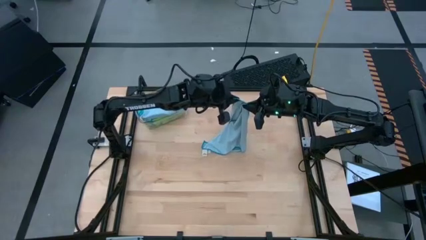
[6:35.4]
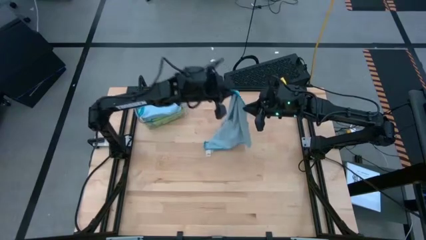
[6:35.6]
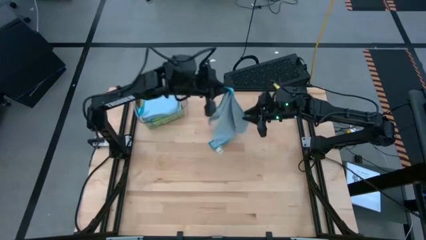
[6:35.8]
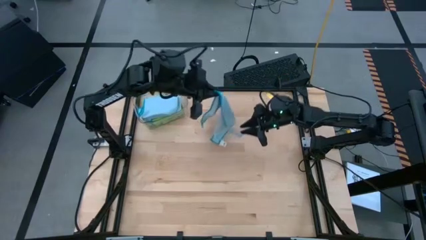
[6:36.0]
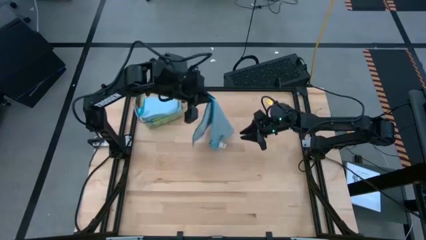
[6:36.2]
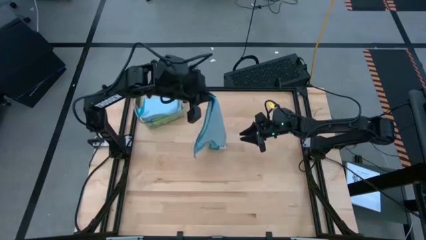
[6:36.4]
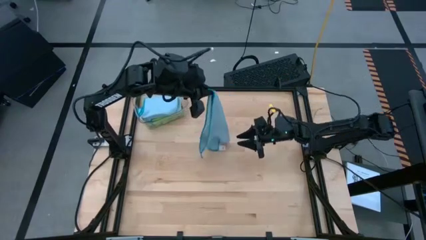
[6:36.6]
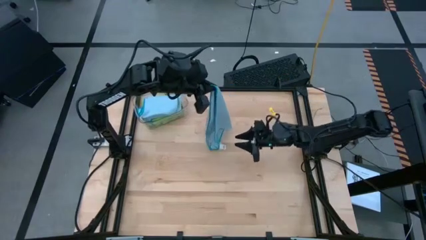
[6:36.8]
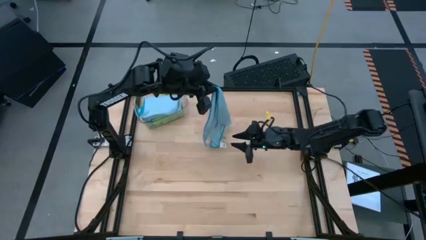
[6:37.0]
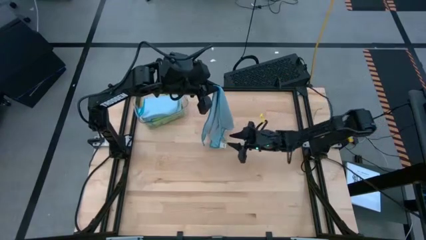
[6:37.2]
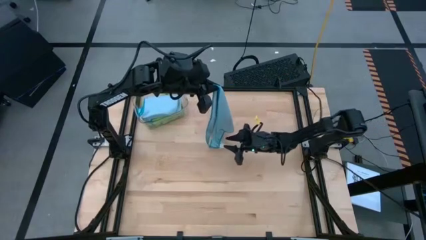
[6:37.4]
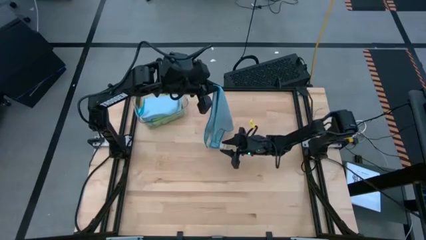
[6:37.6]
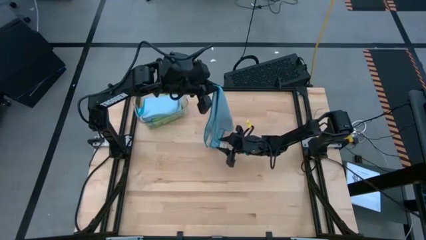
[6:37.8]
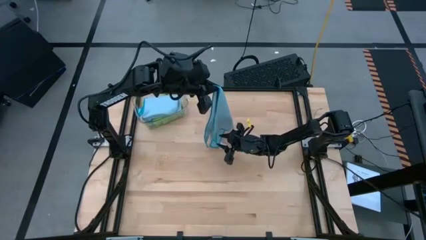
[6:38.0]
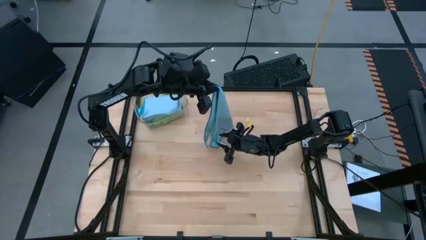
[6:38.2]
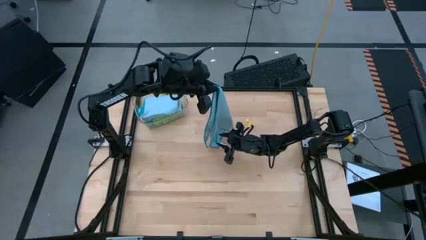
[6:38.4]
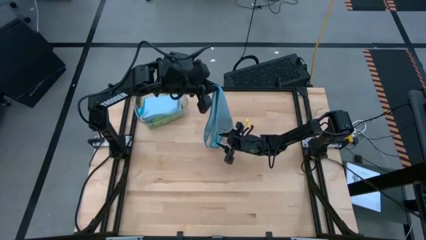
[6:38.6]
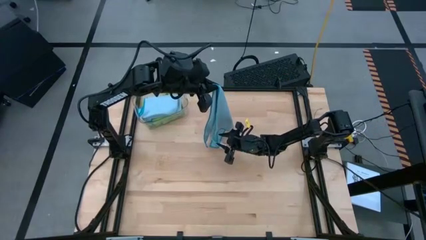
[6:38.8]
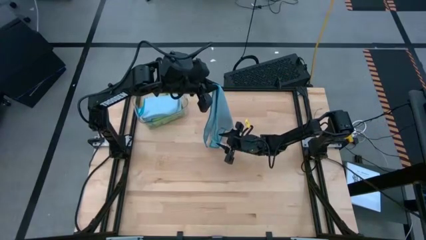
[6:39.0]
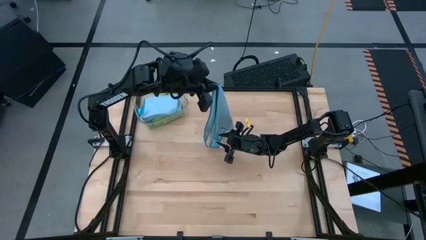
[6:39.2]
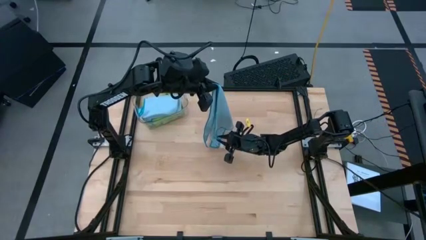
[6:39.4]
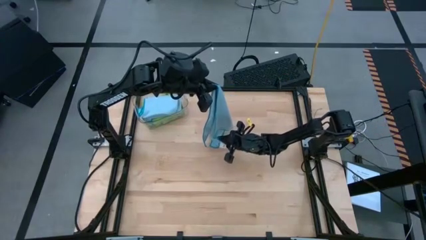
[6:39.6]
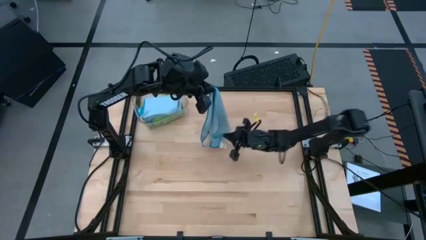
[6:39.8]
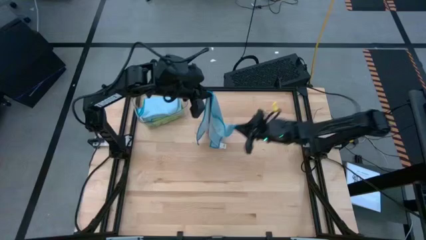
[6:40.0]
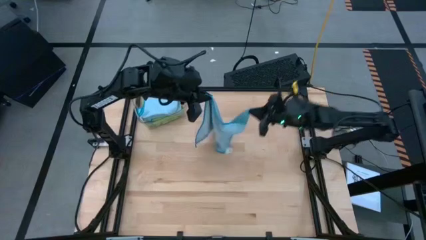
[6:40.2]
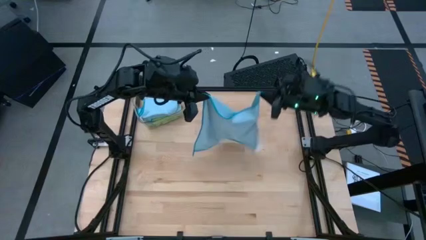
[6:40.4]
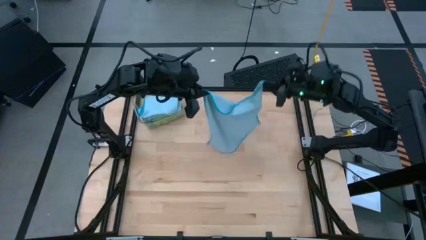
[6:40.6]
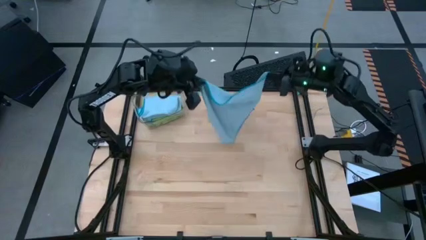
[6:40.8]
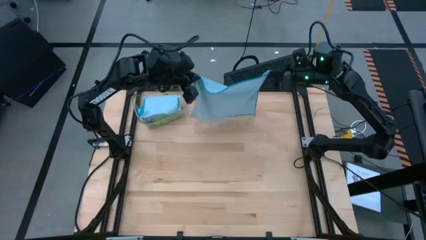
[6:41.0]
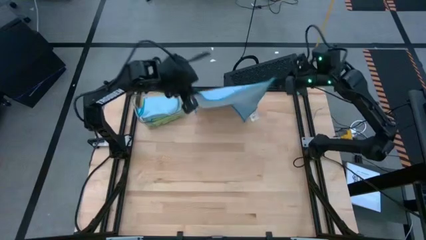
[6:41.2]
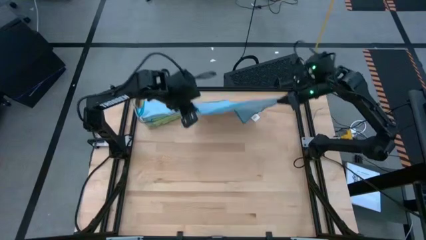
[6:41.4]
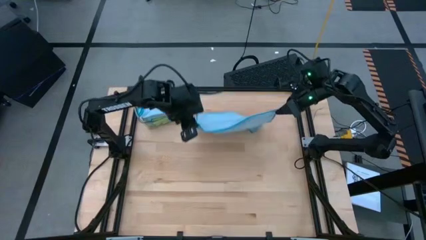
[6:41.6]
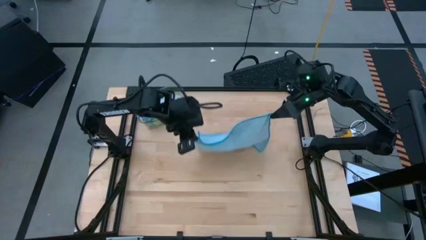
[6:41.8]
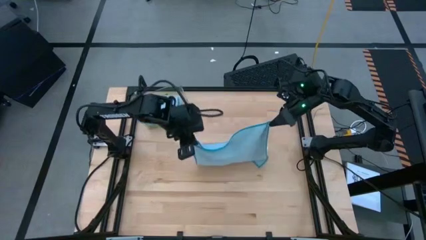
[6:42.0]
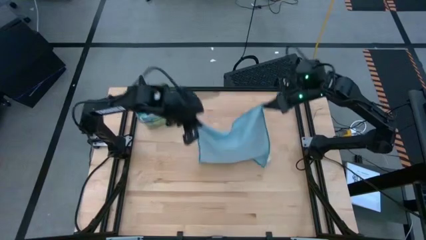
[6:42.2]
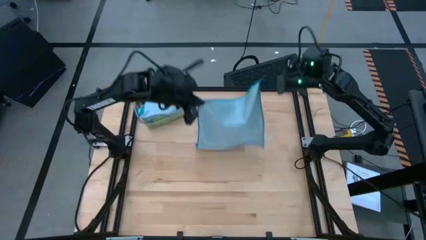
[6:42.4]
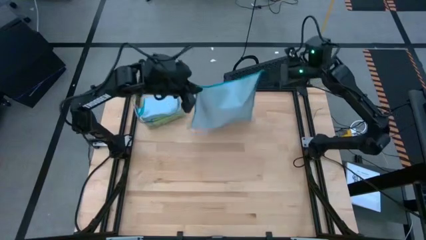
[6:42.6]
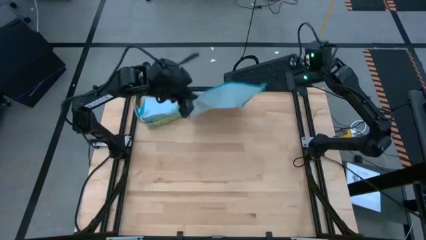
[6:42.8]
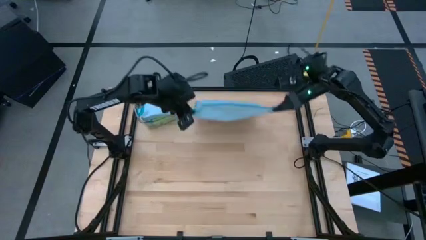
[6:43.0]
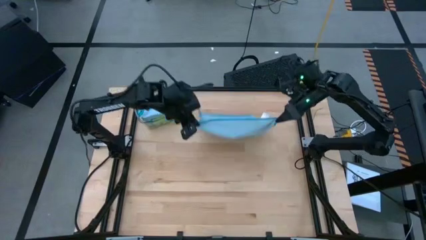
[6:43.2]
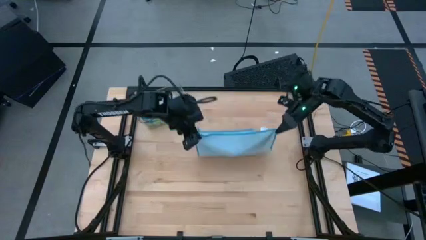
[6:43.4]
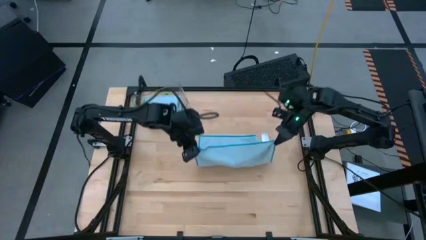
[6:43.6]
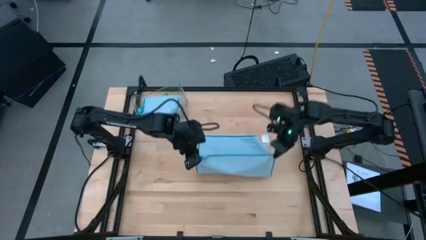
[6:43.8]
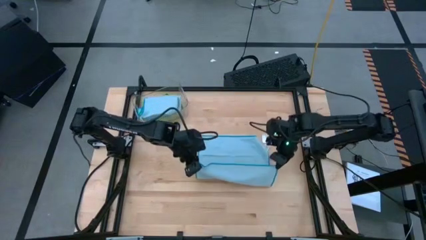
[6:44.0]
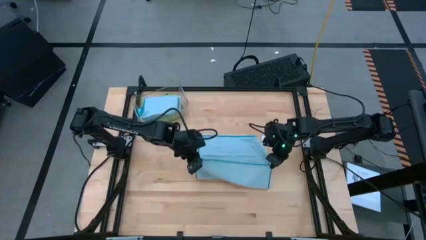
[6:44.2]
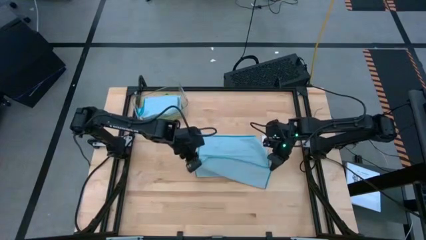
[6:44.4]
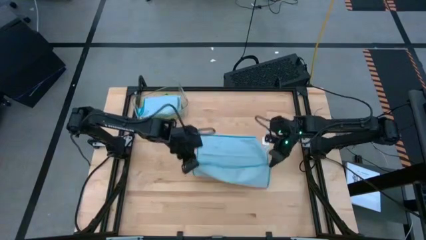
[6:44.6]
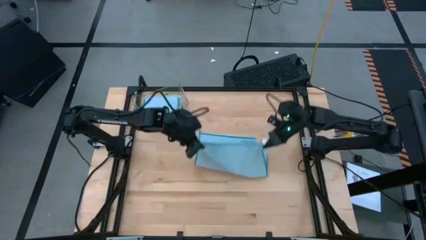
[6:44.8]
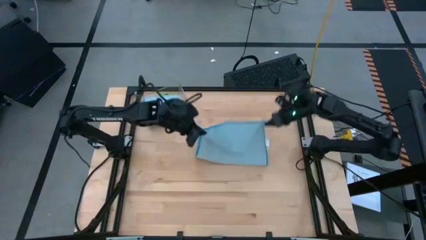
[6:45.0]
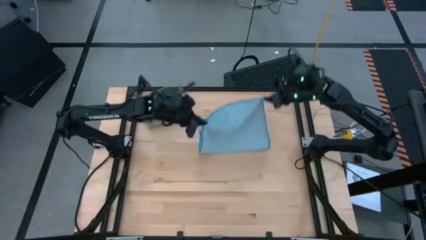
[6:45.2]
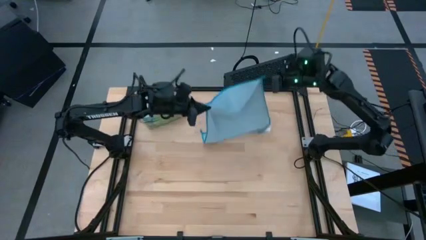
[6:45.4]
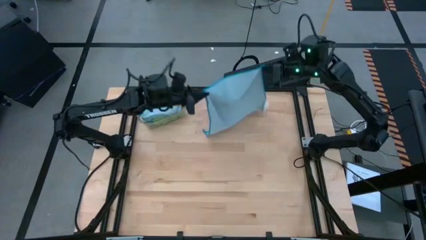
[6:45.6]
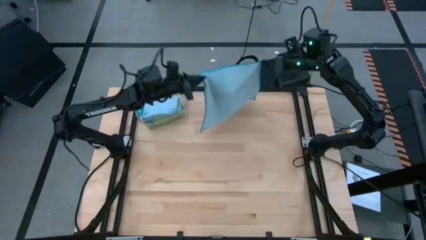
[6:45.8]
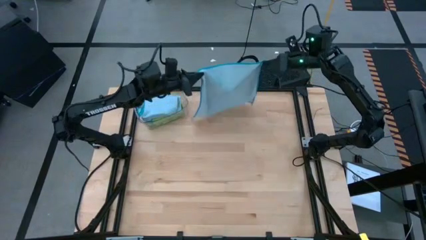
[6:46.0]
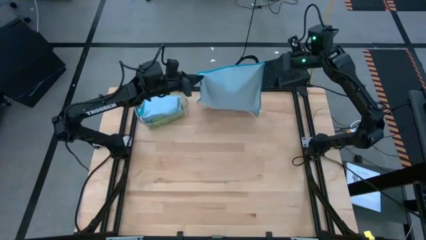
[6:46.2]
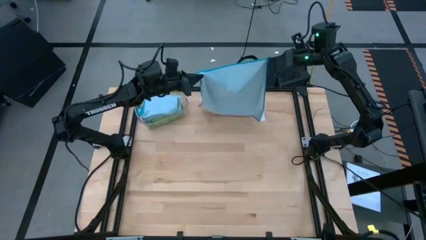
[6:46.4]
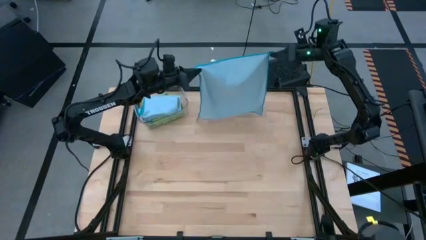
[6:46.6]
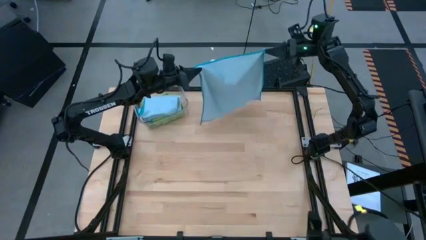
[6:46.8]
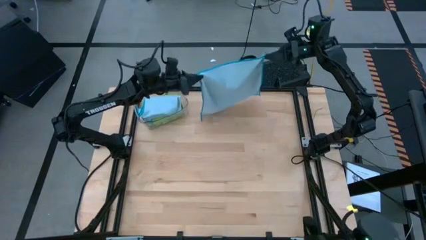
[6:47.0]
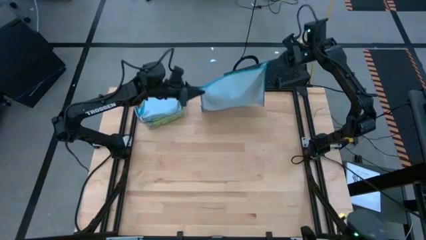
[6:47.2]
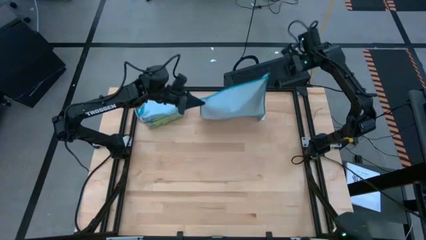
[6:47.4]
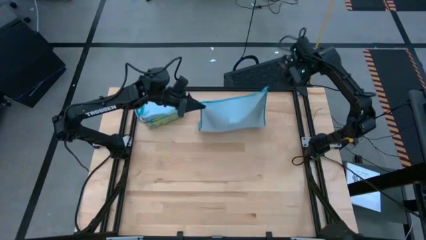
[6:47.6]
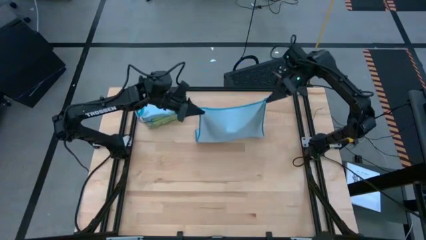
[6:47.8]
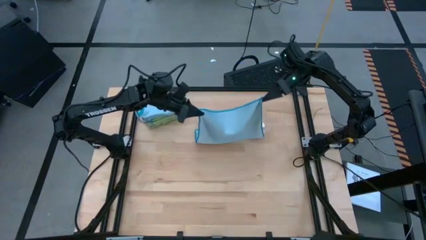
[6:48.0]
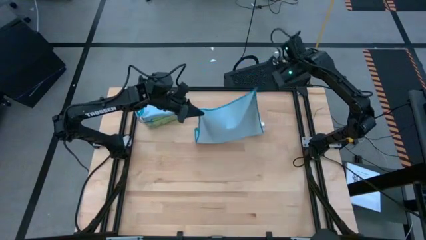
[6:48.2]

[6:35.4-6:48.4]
Task: Fold microfiber towels
Fold the blue microfiber cloth

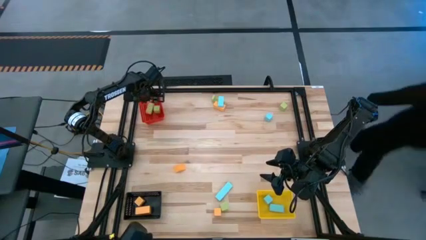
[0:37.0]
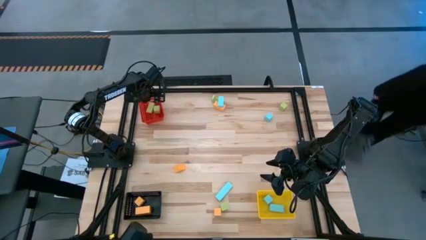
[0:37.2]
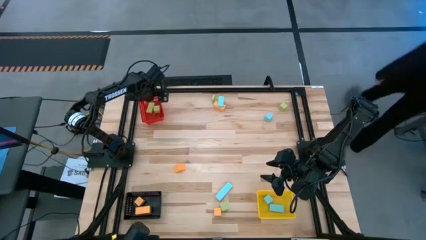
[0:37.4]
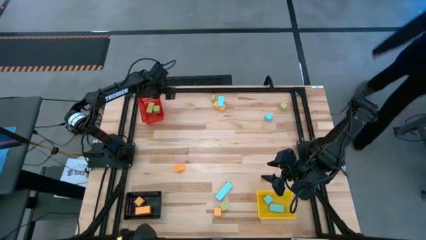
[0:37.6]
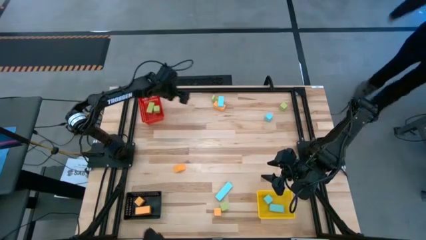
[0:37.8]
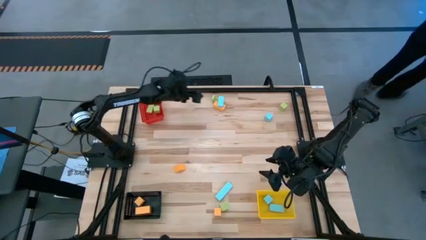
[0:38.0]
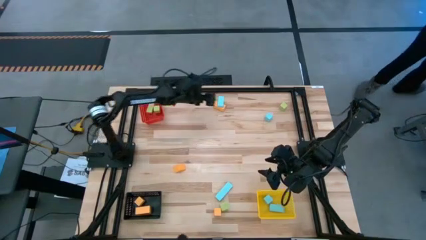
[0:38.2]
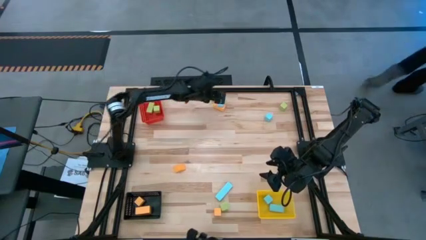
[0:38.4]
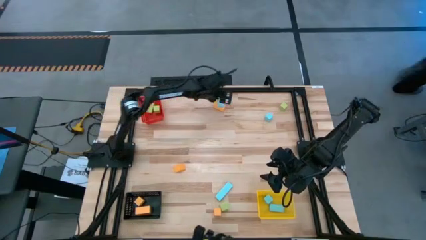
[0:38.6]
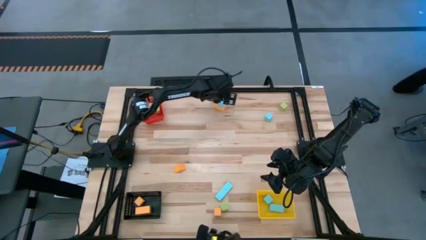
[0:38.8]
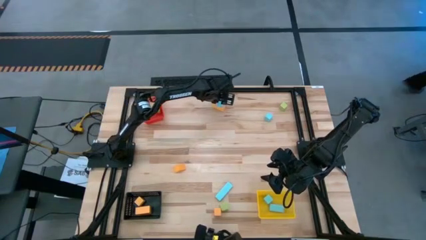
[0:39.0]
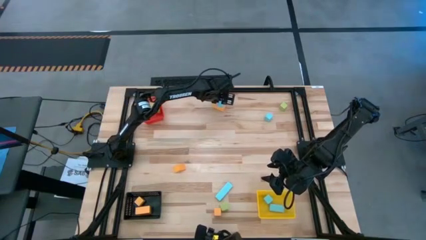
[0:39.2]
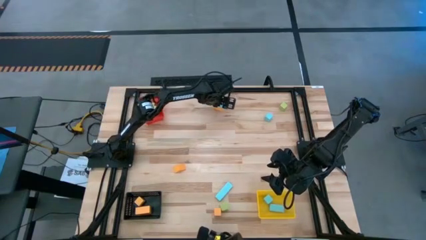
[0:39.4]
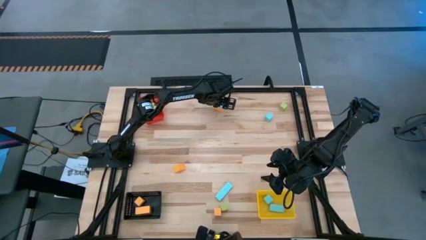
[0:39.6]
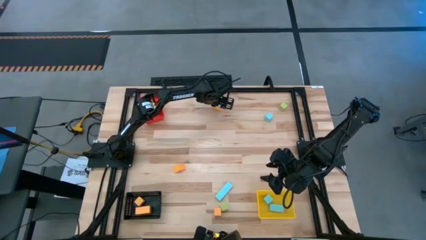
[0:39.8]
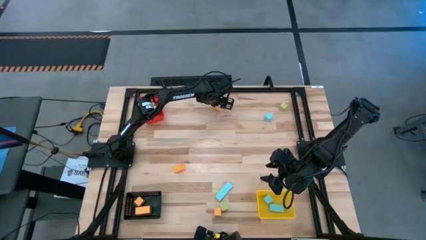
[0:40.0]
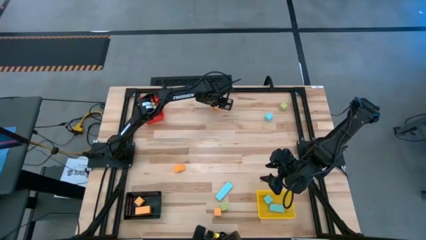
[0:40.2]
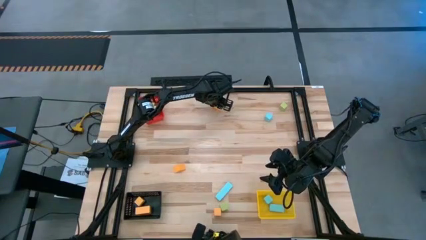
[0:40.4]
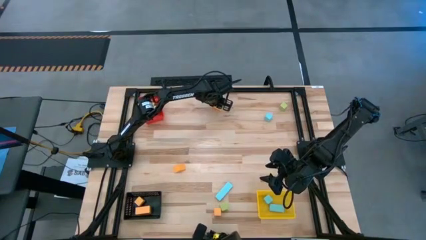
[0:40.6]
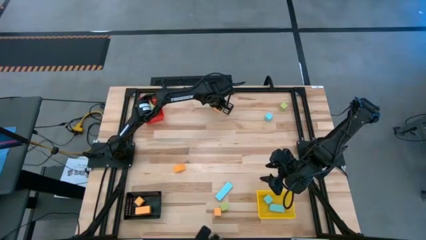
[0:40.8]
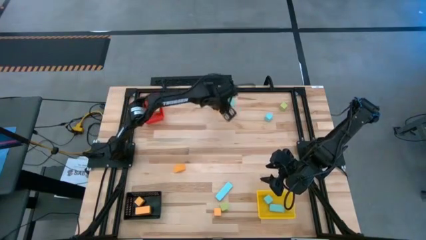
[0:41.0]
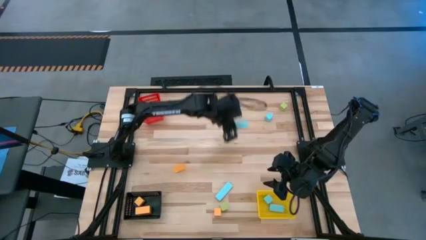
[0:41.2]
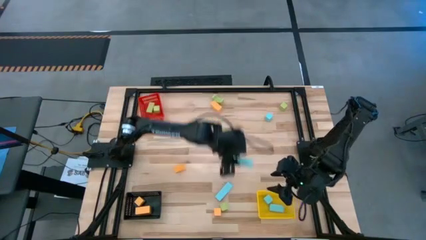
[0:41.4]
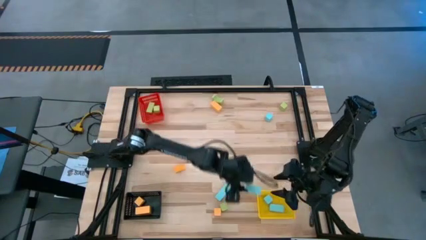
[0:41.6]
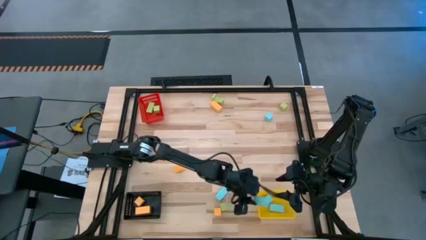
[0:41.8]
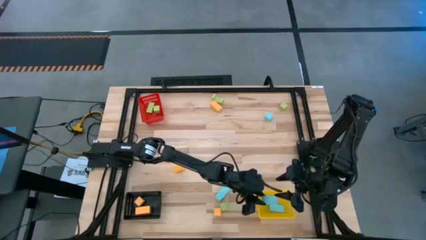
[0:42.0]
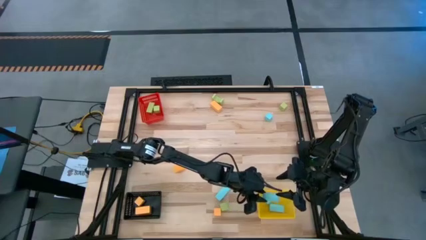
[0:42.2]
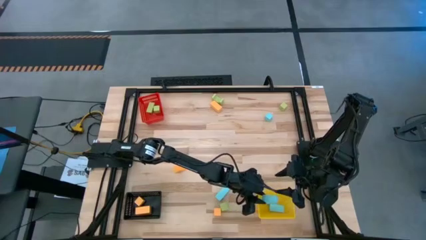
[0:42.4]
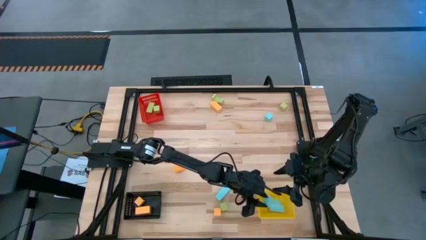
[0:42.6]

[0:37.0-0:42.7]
Task: Sort & place blocks by color
Put the blue block into the yellow bin
